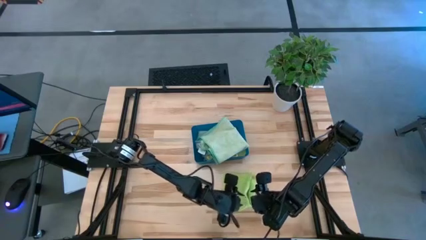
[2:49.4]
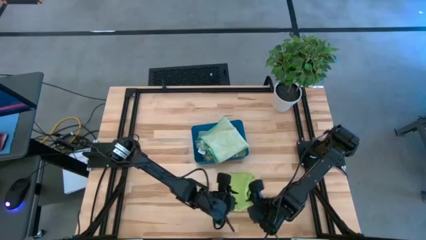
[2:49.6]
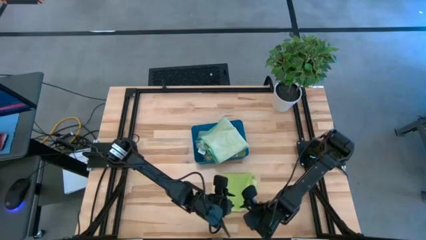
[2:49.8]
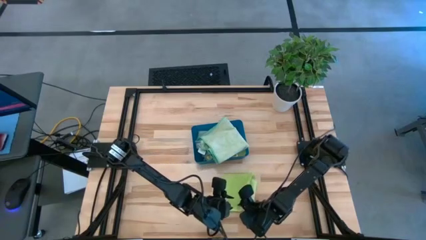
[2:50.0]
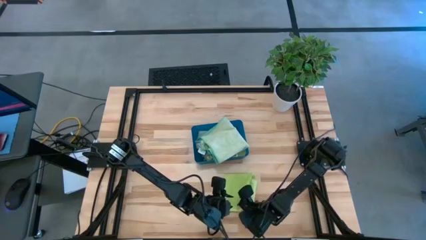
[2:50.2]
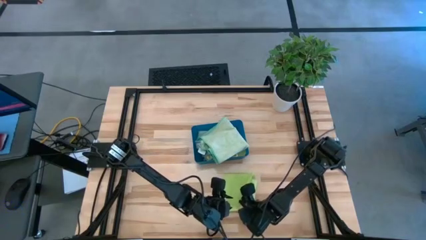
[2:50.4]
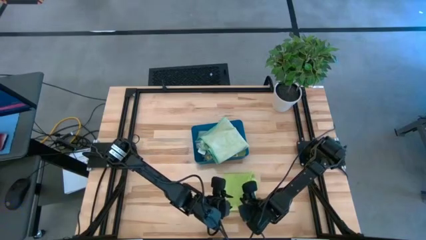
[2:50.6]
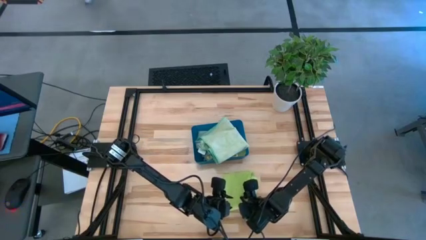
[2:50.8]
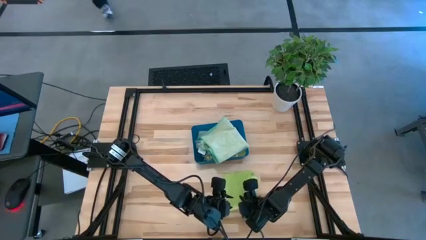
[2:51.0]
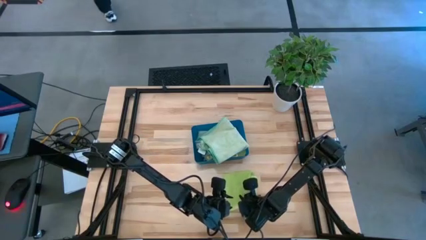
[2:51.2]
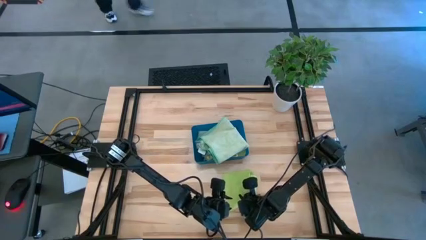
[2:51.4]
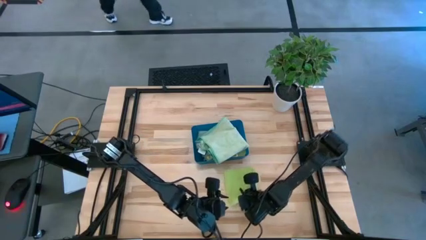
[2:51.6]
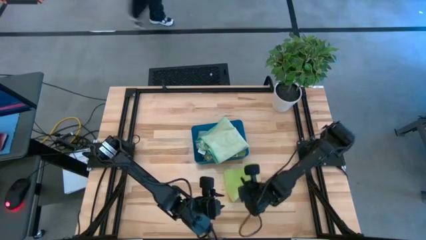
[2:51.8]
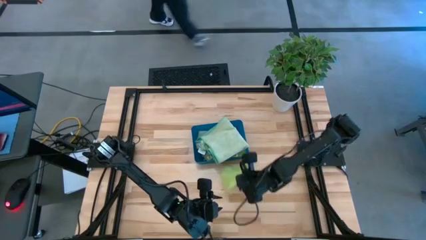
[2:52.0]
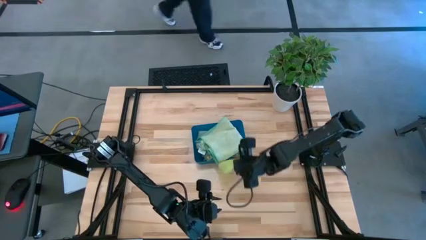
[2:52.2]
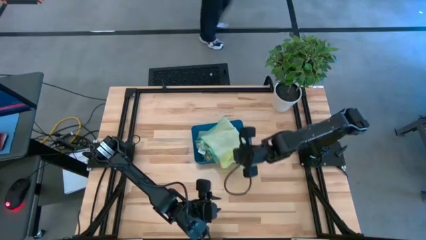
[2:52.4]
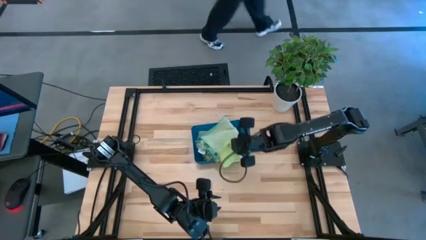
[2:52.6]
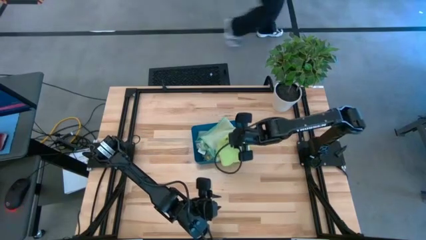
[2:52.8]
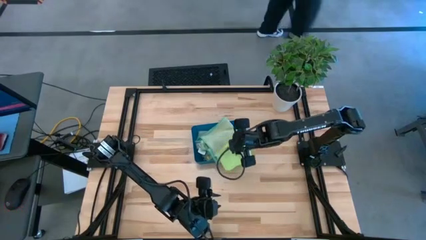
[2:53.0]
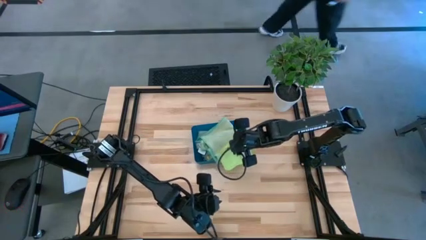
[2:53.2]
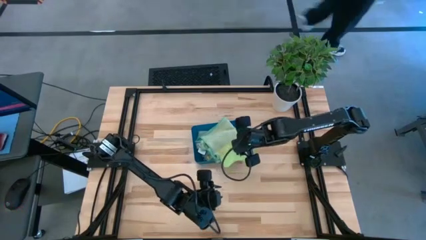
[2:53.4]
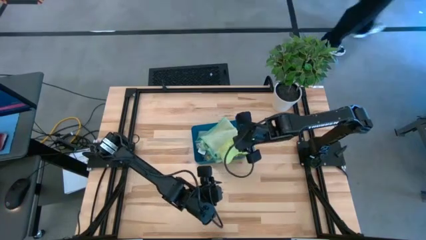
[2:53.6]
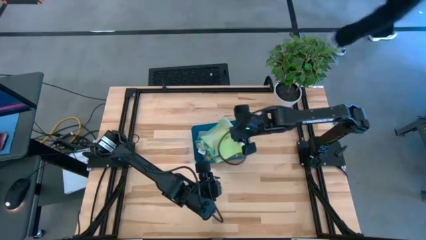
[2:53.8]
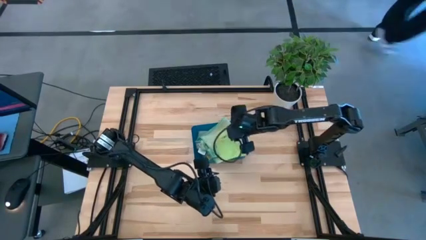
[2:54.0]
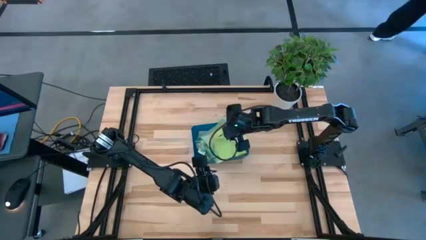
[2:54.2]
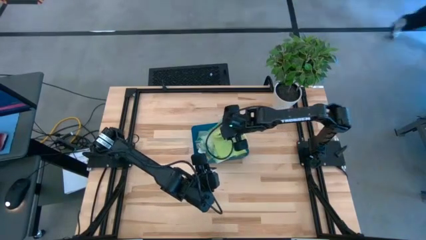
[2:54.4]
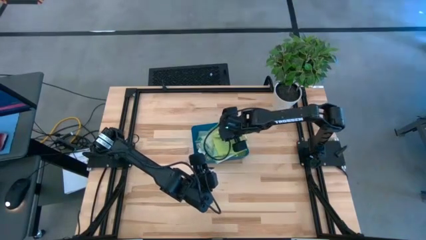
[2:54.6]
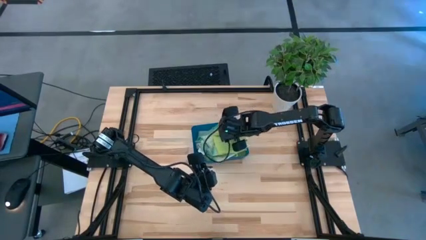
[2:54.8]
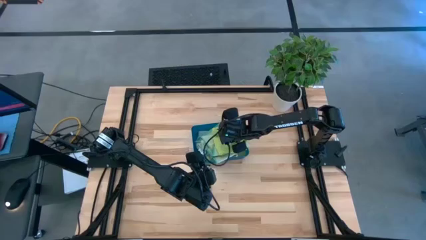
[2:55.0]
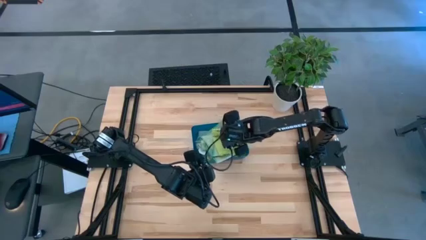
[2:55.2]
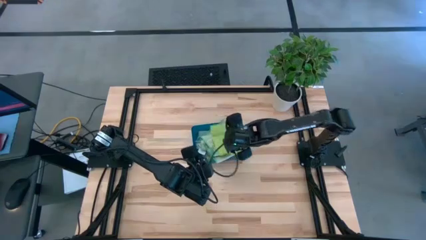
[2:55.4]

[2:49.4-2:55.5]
Task: Fold microfiber towels
Put the folded green microfiber towel into the blue bin

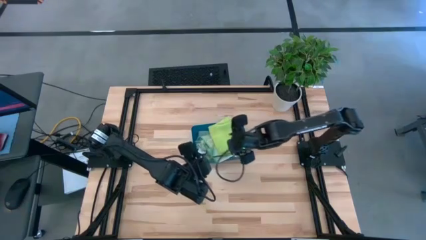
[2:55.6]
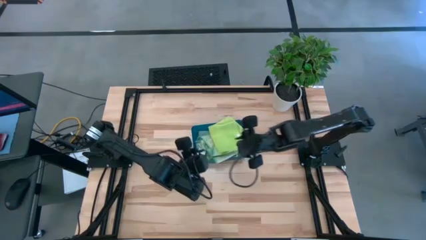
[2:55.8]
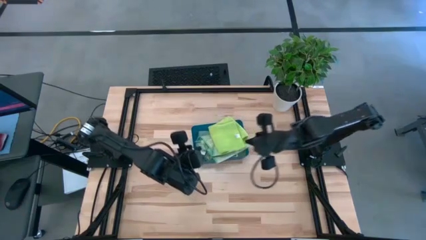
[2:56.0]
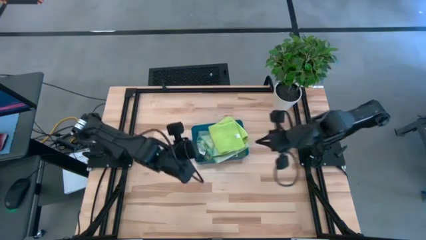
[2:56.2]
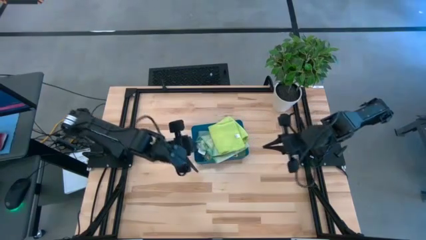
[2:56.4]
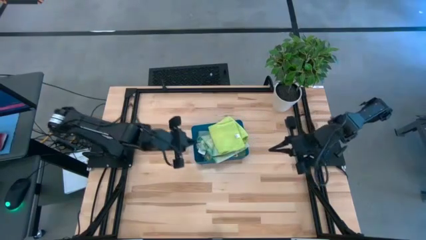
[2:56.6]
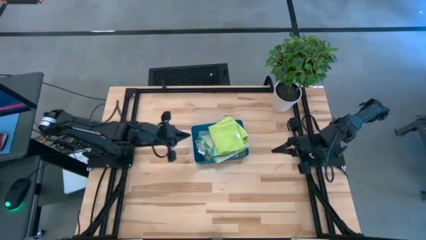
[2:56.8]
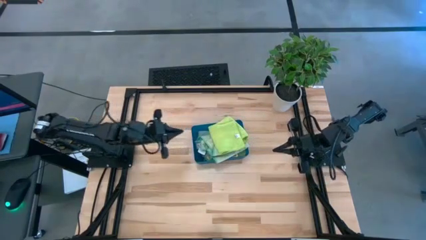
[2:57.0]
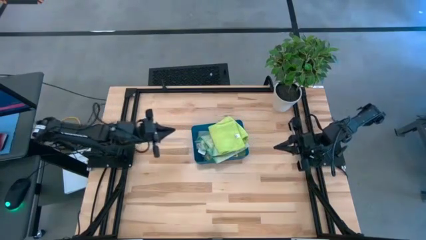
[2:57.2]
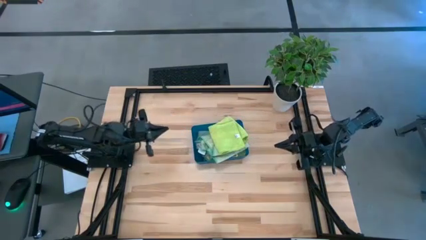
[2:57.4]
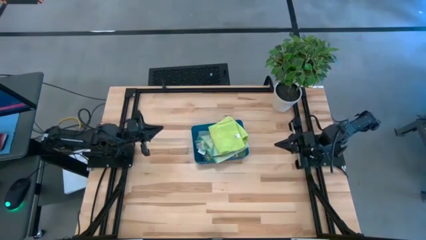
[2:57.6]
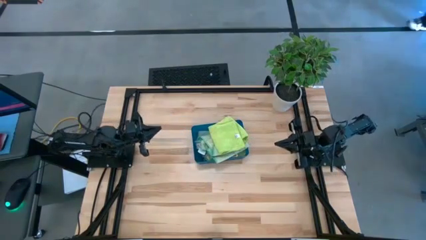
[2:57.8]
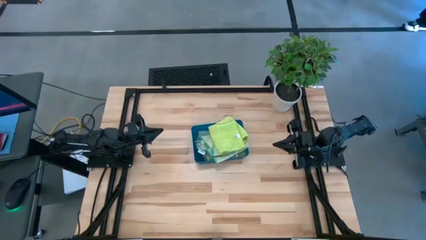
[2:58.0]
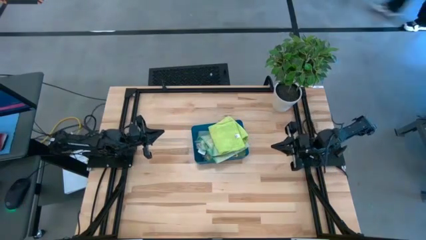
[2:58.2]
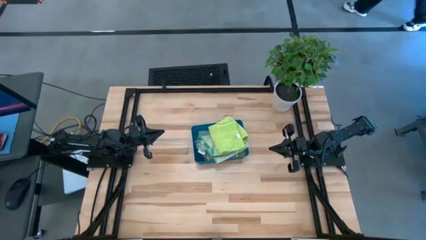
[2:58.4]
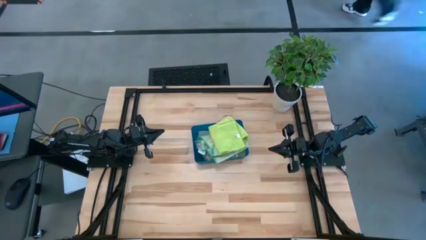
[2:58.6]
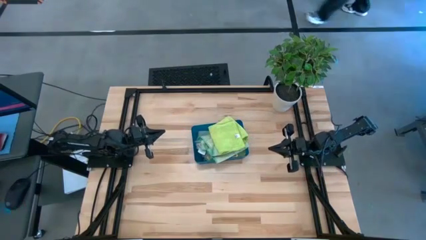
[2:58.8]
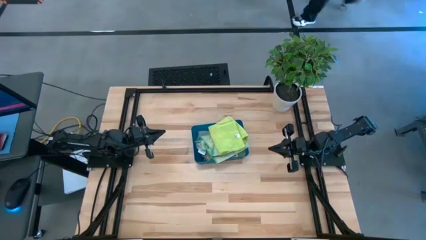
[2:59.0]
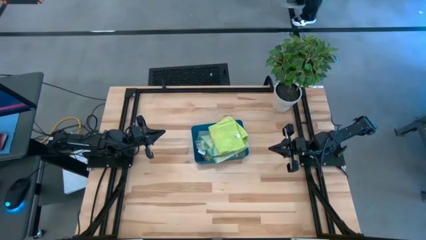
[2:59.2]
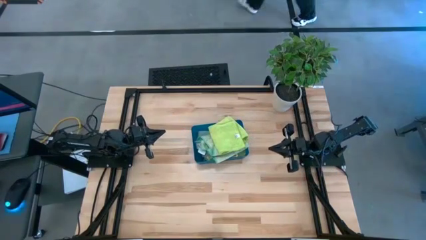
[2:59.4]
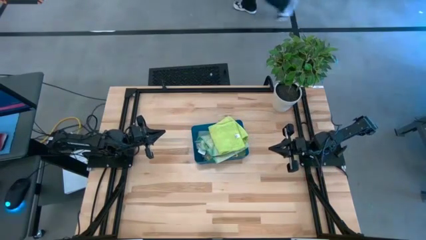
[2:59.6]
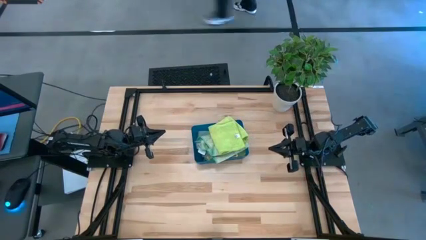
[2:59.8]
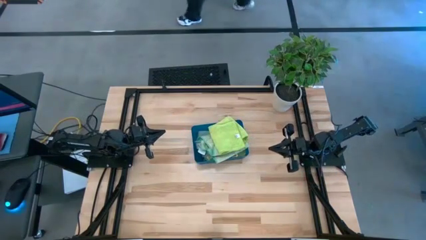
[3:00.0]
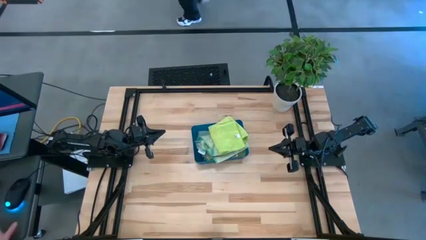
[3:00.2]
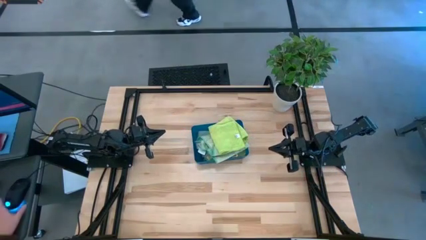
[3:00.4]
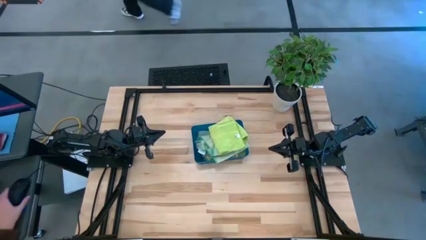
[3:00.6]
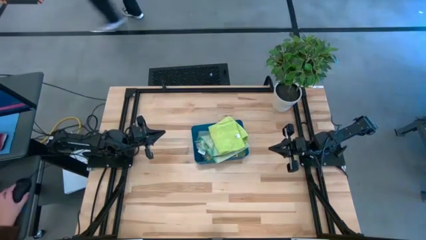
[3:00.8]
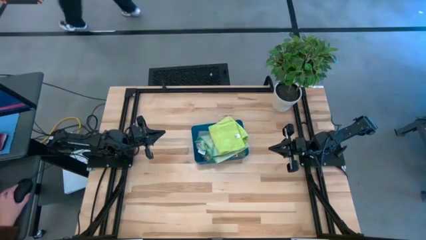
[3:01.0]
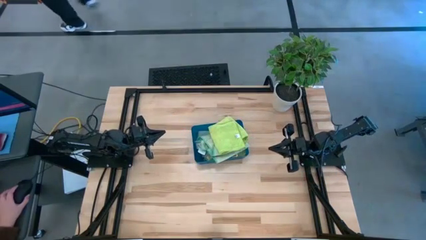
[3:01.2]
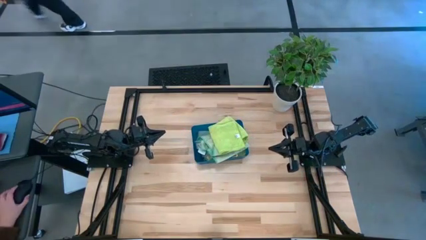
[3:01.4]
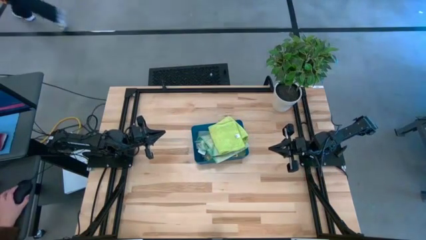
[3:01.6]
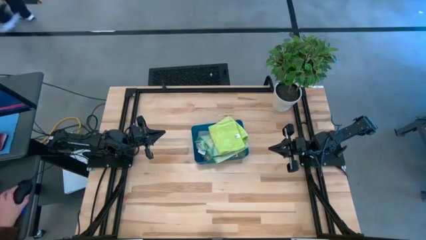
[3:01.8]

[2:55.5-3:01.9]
Return to Home Position

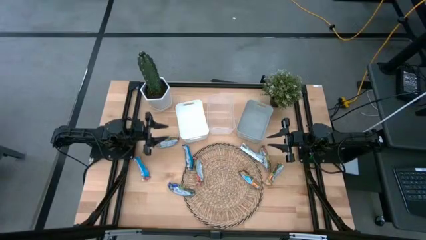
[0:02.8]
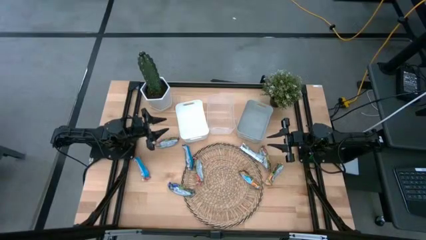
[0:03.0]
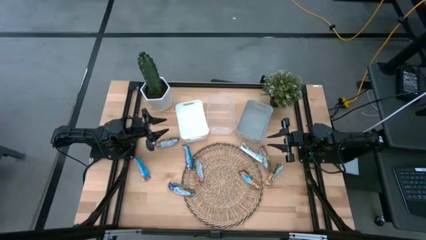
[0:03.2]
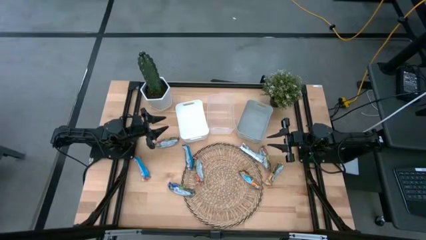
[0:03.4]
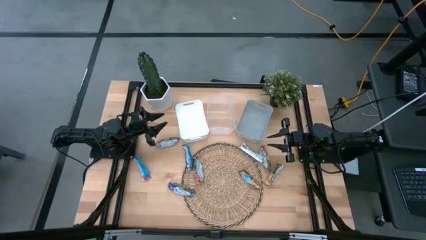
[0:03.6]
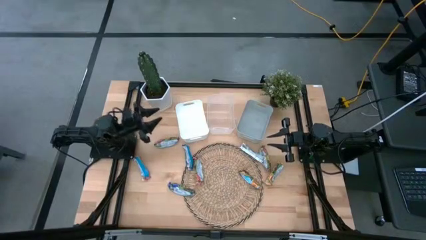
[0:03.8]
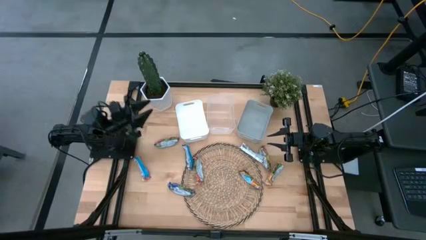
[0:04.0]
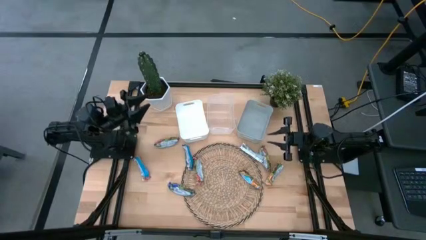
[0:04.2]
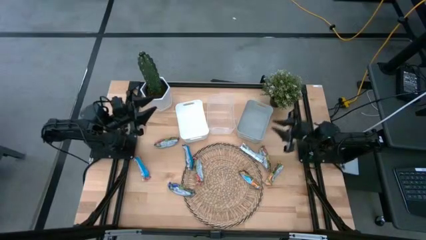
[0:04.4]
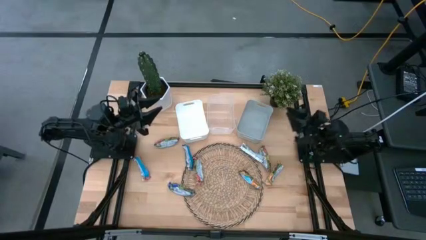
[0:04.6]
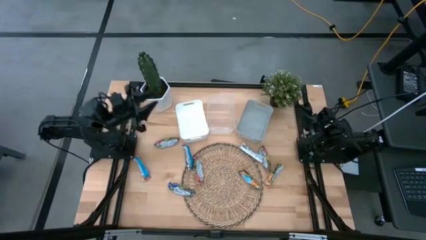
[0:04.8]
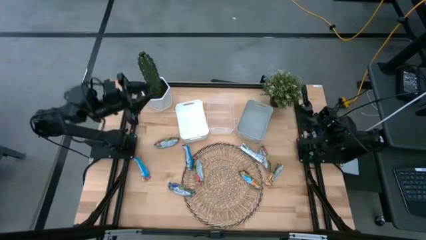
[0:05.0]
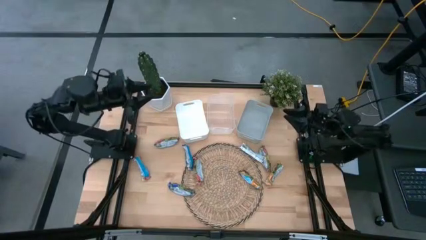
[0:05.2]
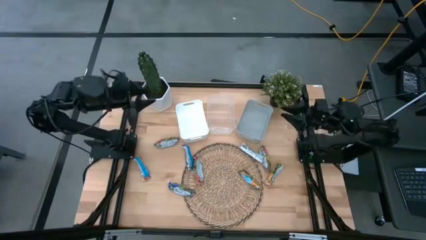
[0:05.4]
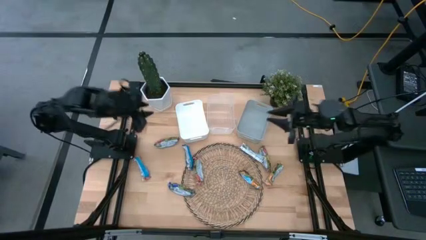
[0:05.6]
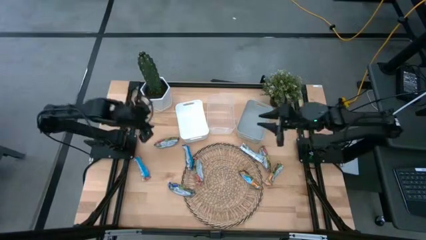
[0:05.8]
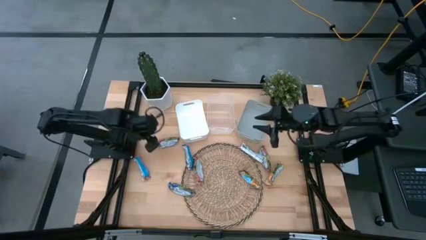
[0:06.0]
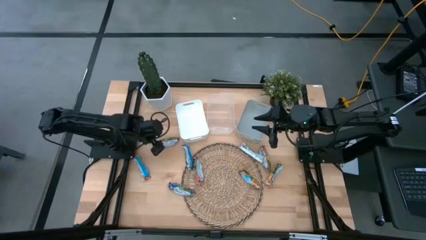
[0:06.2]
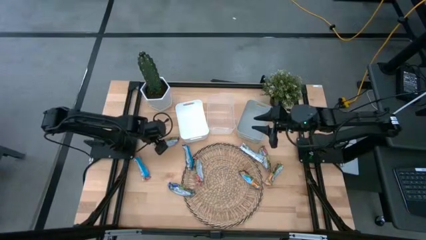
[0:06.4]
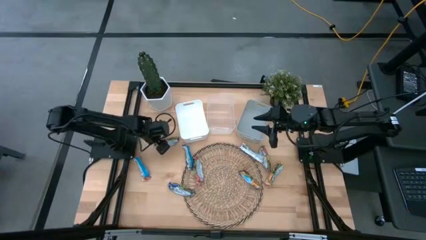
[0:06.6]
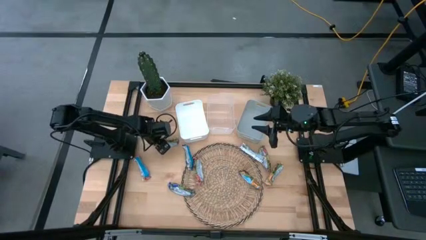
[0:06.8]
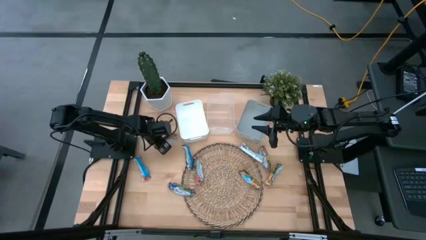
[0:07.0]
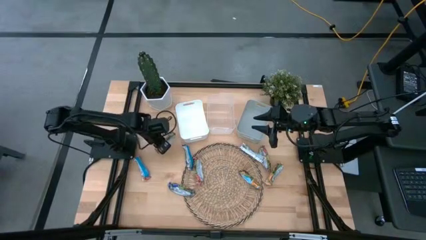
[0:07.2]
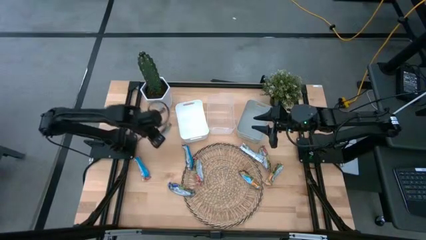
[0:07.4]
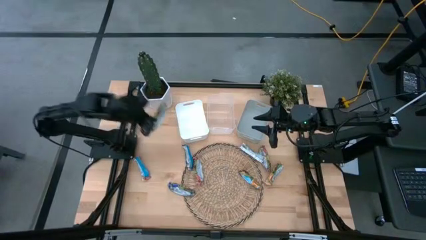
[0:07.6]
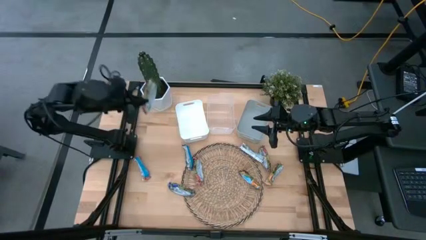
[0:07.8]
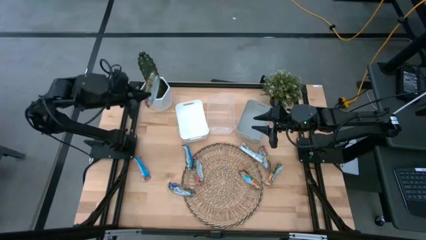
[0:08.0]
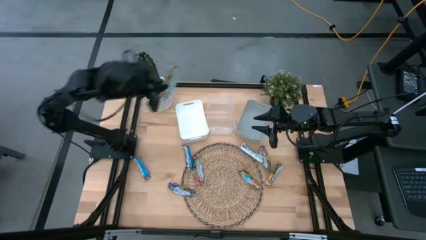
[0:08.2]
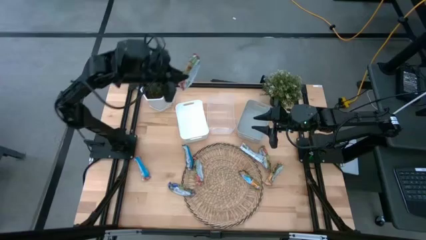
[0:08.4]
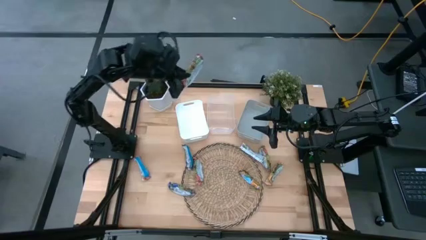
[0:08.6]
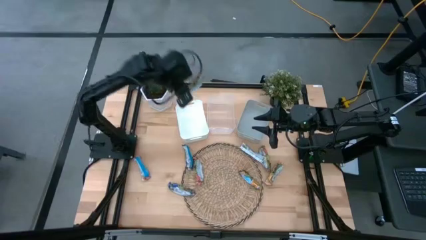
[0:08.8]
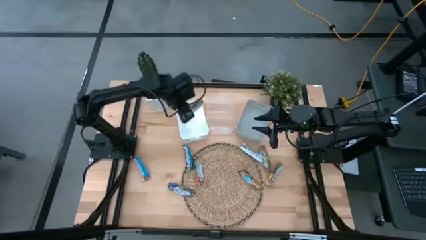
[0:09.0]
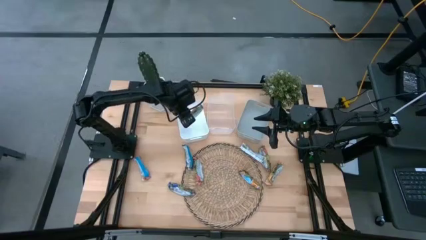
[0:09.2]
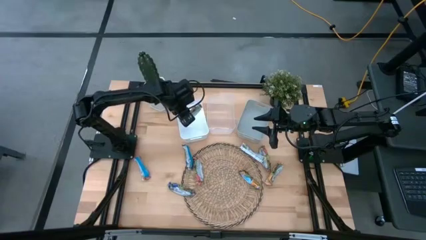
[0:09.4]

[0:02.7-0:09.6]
Task: Pick and place Granola Bars by type
Put the red granola bar into the white bin
